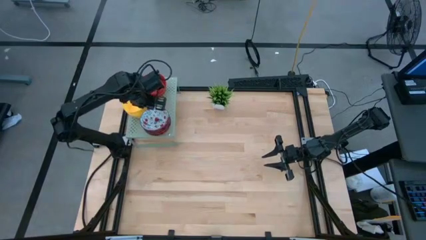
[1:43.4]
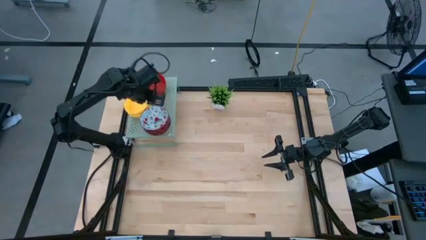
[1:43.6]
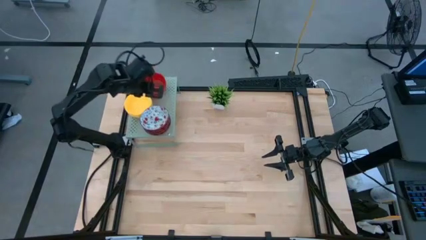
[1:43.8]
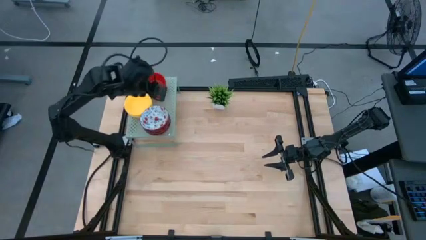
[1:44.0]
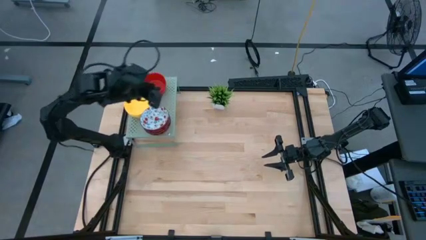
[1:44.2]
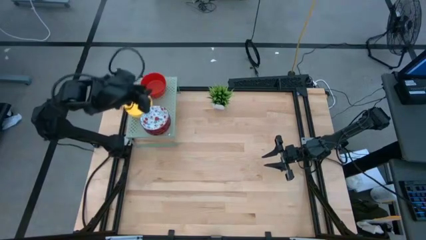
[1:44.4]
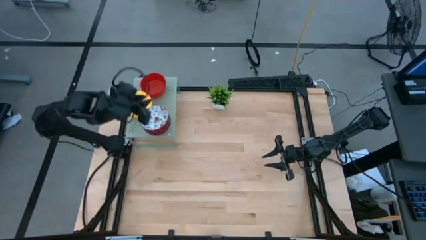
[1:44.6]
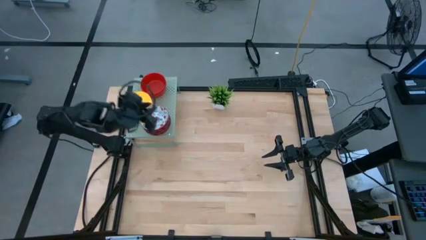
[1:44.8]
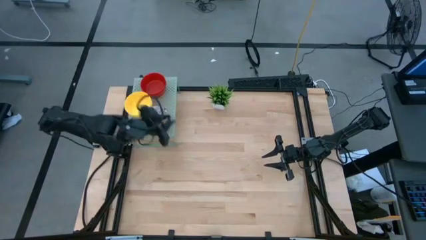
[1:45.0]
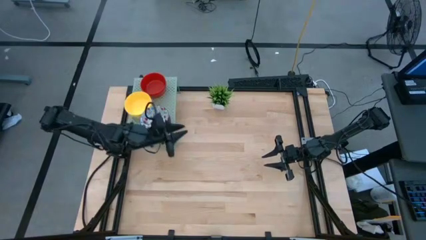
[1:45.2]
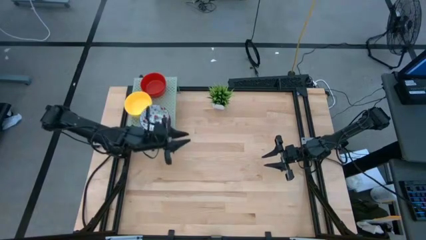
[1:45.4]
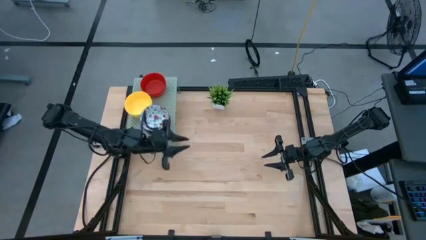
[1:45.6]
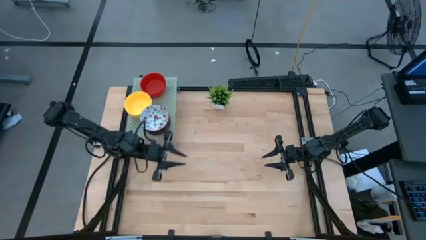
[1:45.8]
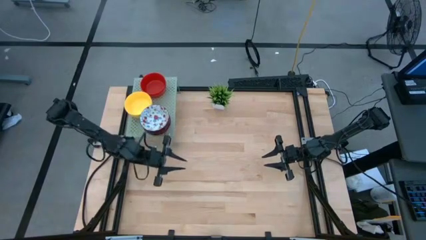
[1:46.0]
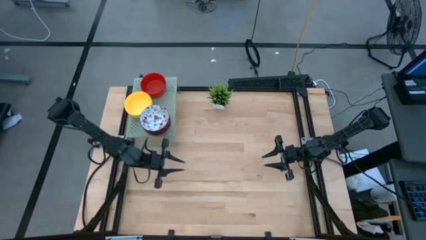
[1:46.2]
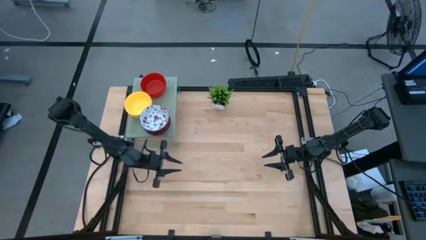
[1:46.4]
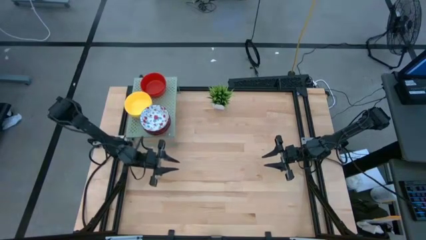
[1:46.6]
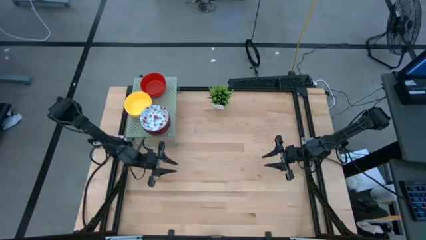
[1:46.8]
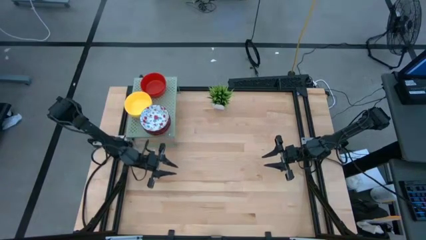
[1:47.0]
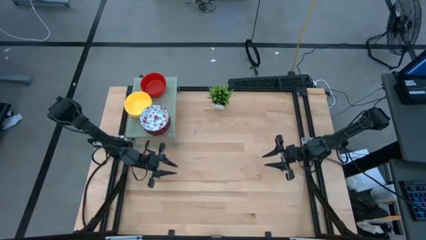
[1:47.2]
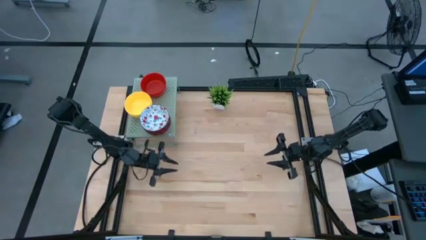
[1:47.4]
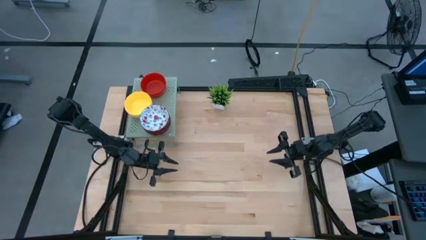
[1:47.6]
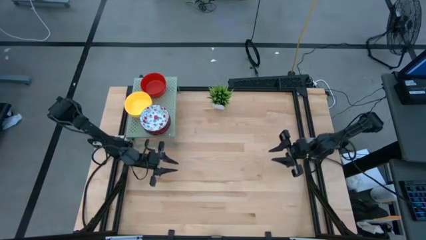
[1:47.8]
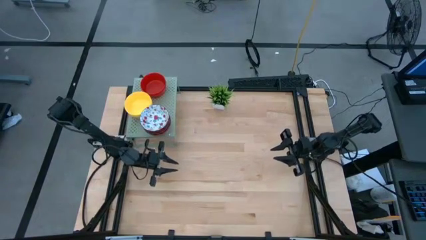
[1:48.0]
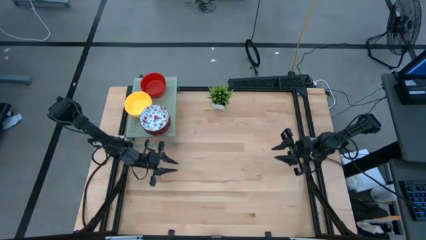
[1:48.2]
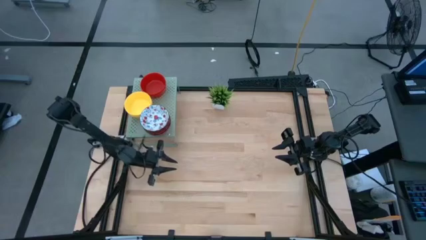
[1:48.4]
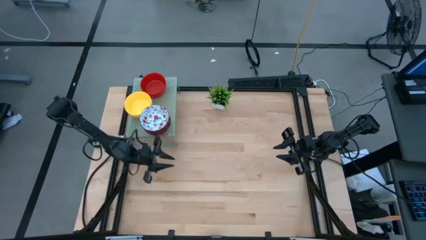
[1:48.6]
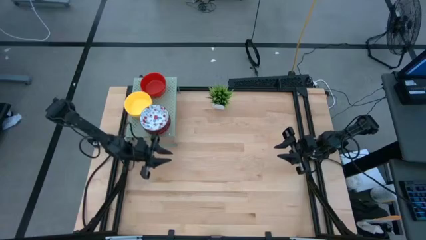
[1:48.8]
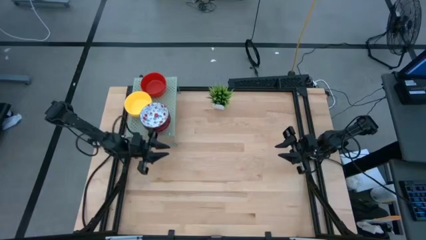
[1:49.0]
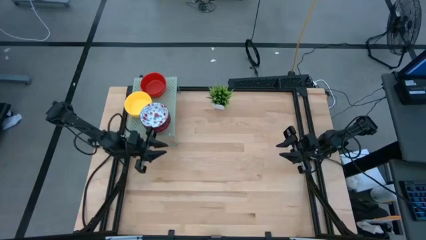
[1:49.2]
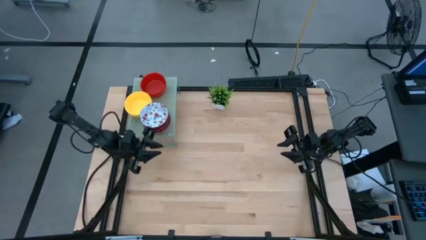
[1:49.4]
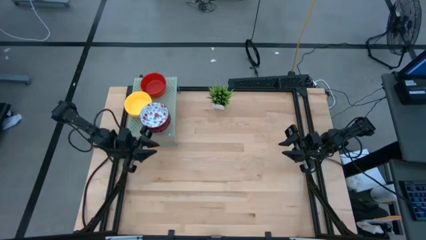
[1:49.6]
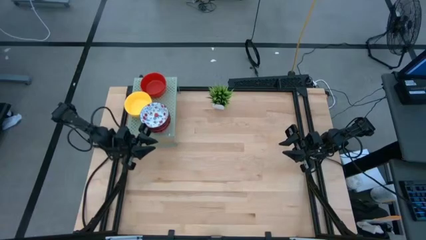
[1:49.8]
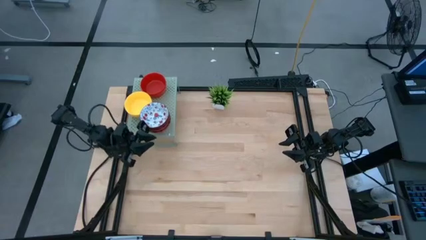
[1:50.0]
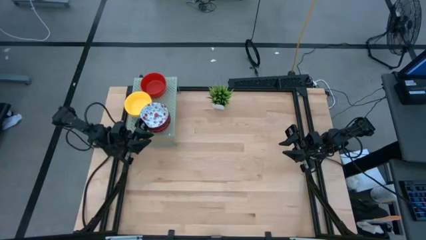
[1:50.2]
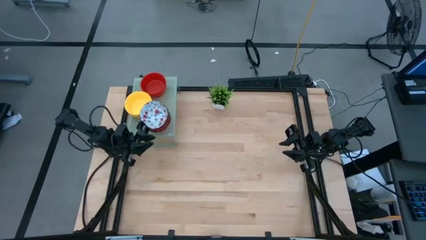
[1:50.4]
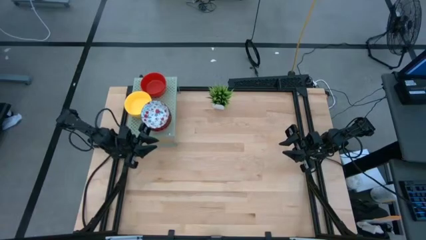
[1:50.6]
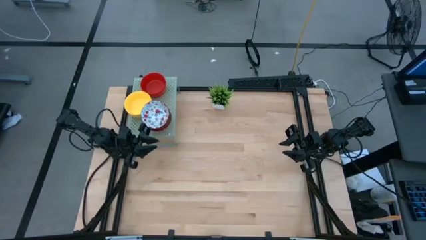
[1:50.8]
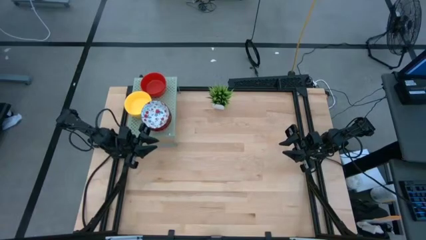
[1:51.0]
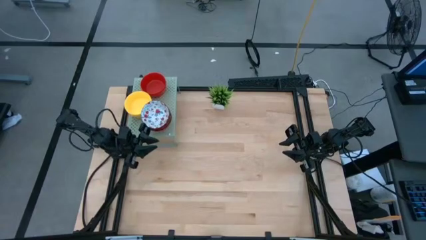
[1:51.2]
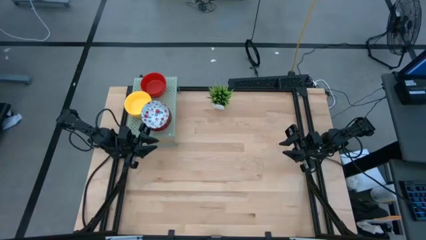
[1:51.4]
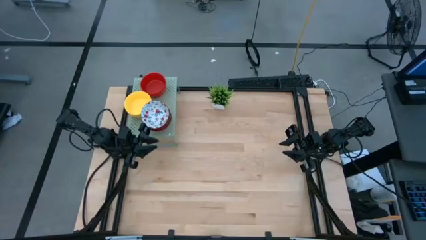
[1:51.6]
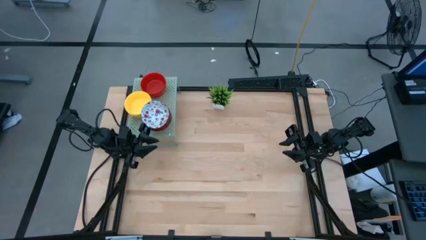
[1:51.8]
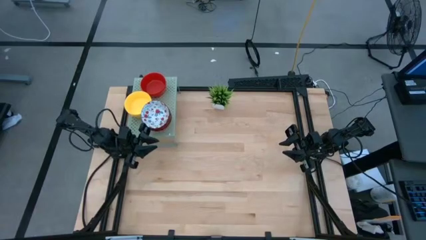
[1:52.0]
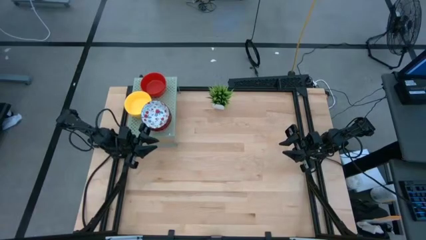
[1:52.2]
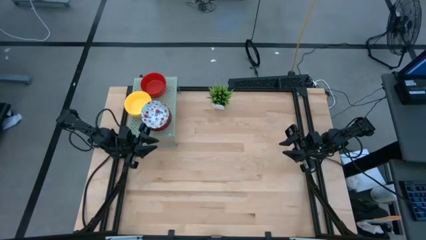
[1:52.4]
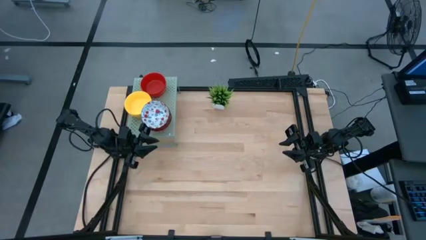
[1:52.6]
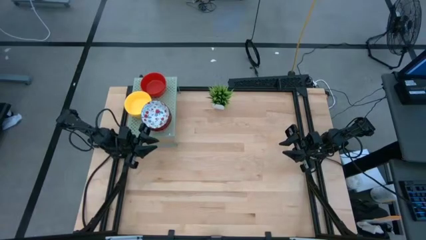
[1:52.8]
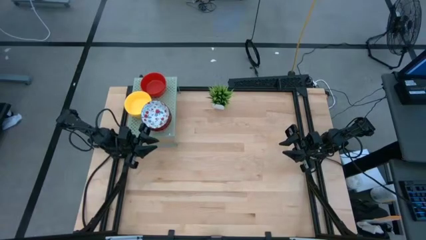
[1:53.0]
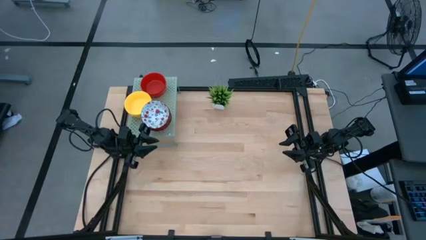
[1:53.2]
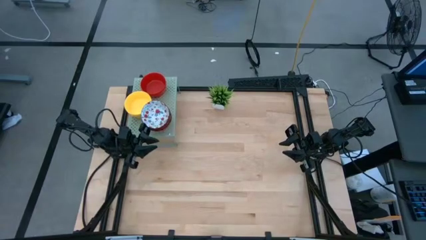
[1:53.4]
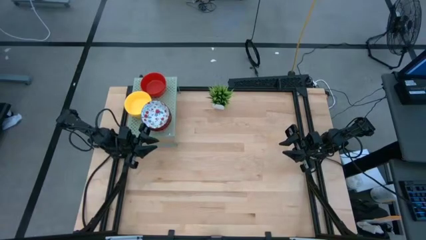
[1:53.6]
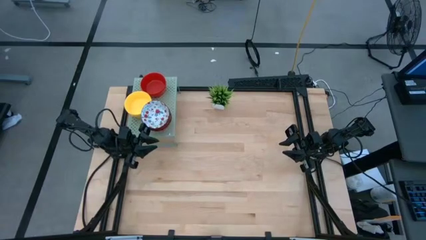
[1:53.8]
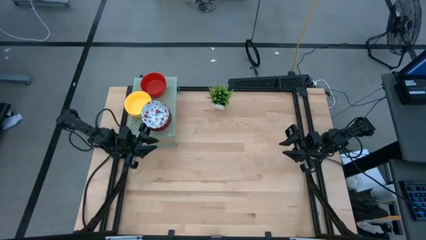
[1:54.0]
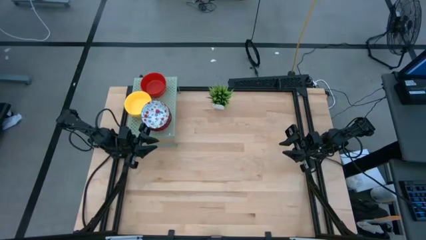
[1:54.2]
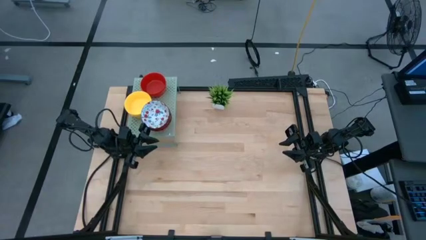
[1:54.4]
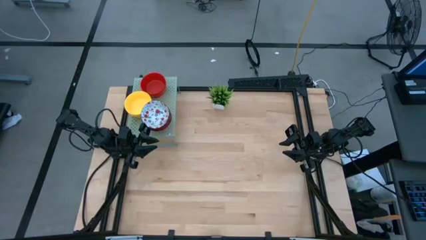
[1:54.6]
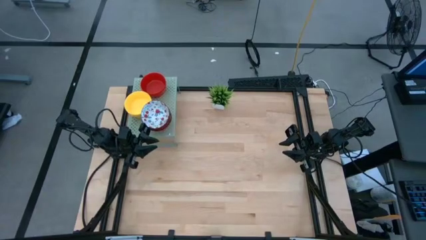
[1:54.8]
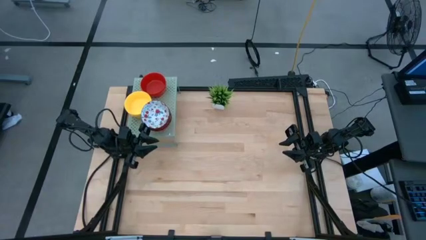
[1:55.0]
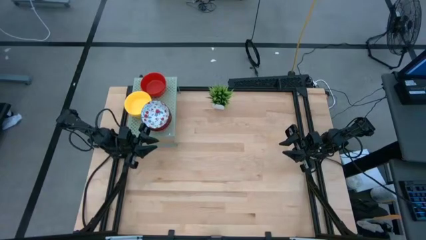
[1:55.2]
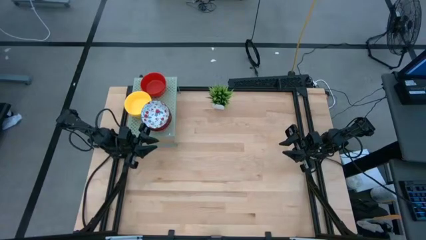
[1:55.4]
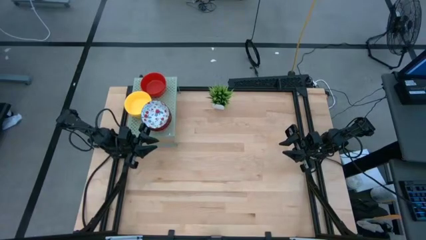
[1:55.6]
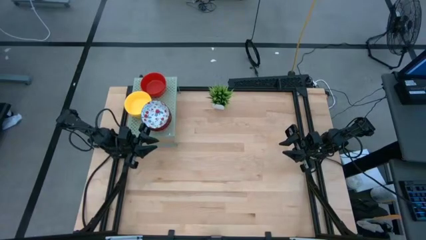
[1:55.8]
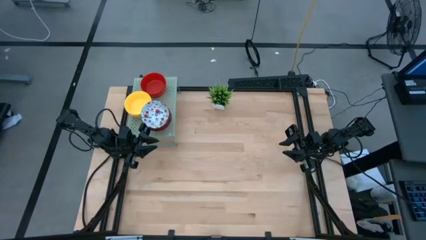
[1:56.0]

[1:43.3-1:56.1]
Task: Pick & Place Mini bowls
Return to Home Position

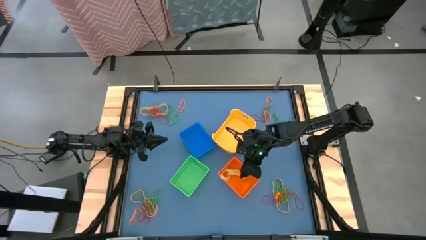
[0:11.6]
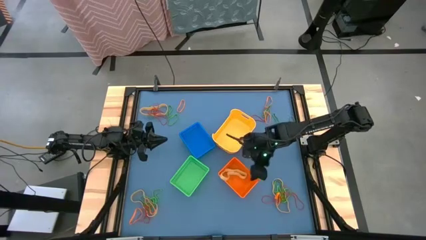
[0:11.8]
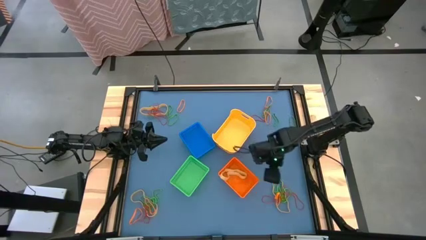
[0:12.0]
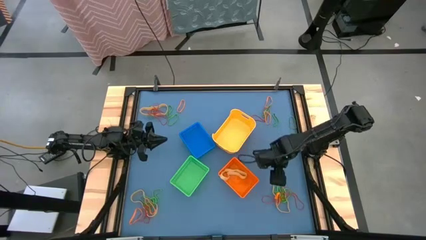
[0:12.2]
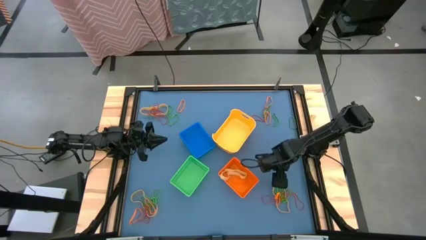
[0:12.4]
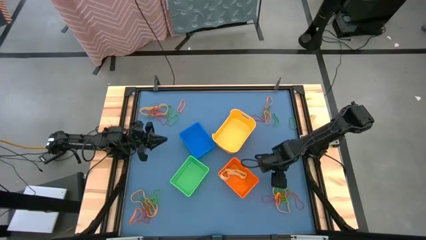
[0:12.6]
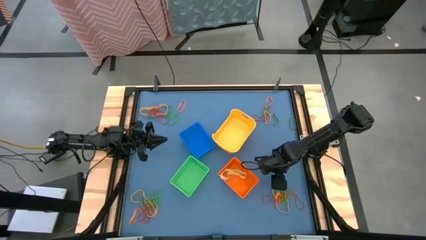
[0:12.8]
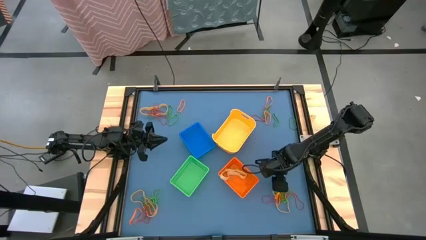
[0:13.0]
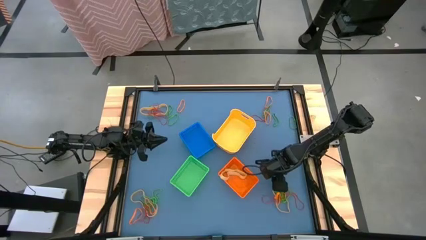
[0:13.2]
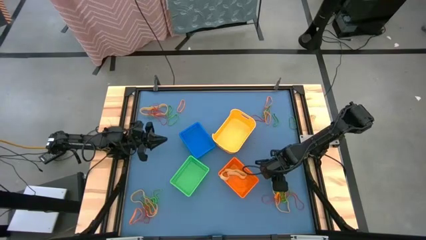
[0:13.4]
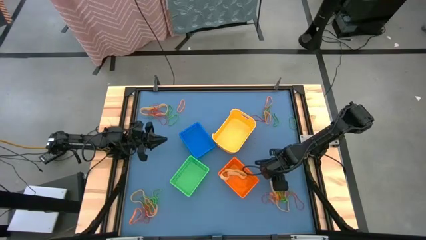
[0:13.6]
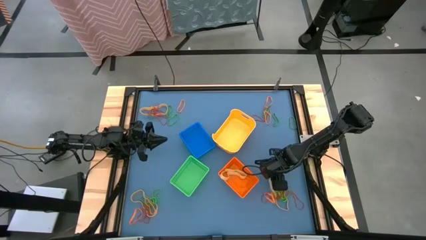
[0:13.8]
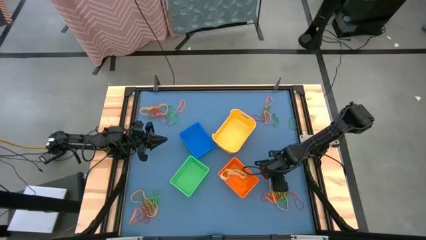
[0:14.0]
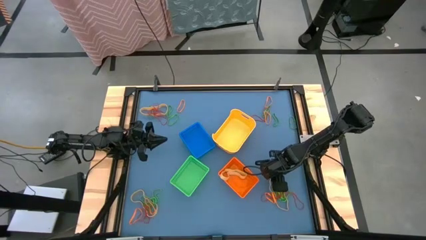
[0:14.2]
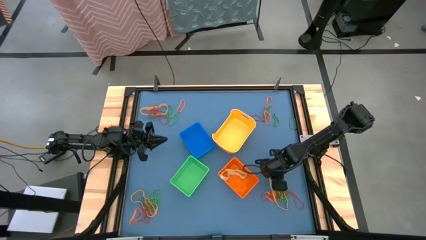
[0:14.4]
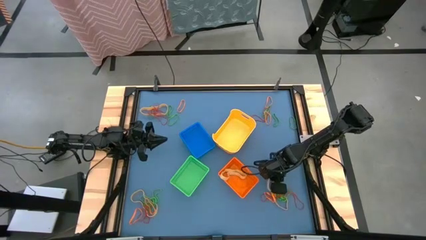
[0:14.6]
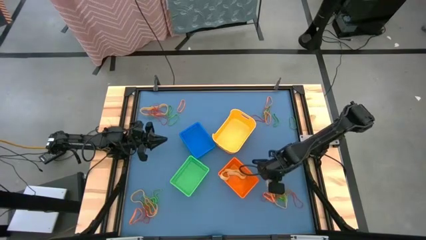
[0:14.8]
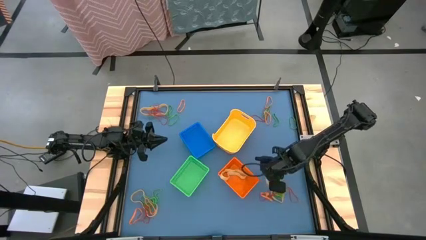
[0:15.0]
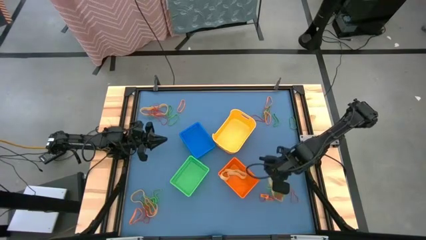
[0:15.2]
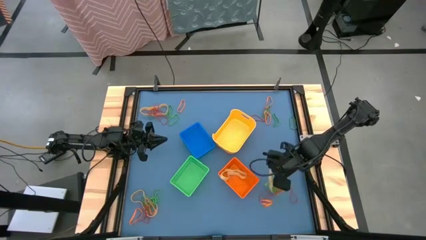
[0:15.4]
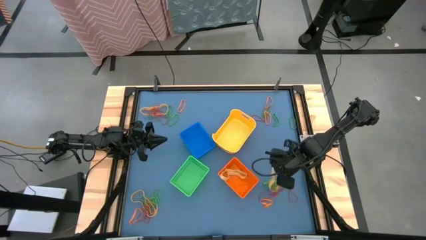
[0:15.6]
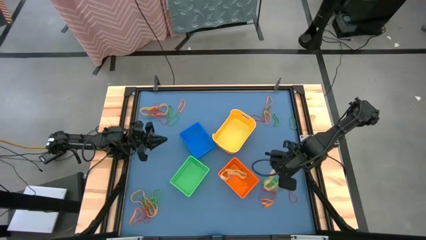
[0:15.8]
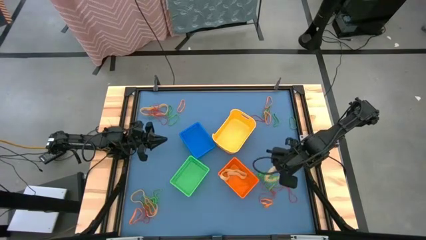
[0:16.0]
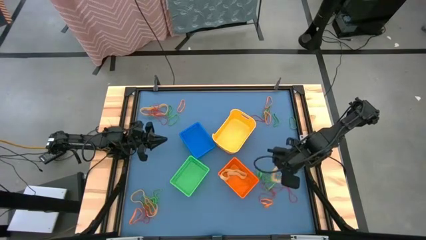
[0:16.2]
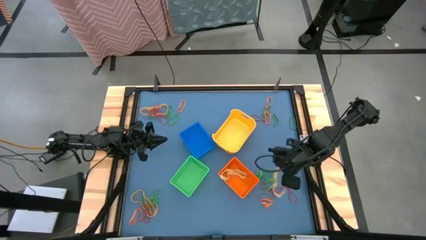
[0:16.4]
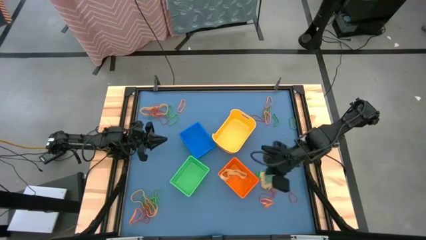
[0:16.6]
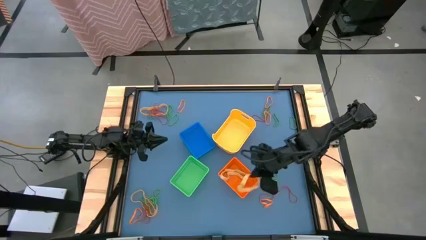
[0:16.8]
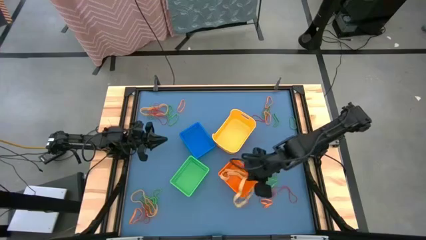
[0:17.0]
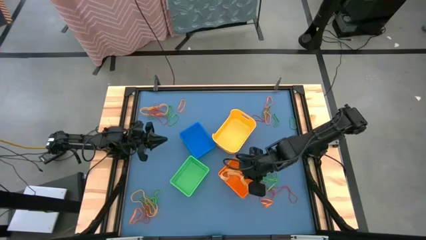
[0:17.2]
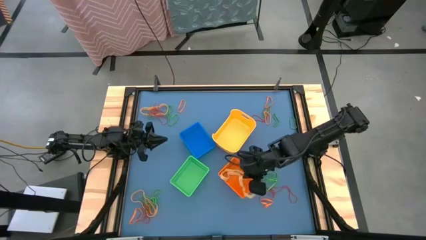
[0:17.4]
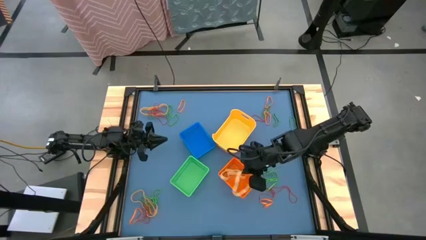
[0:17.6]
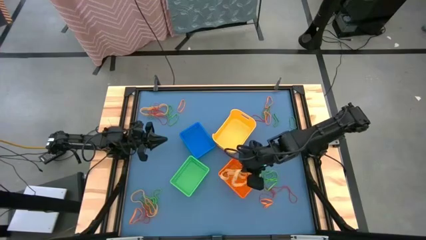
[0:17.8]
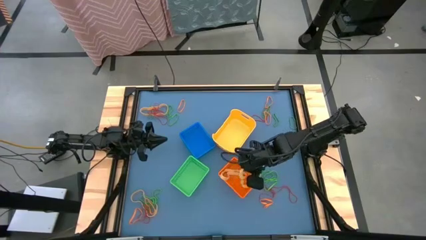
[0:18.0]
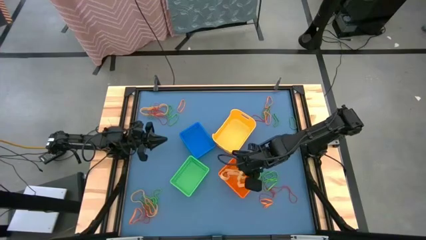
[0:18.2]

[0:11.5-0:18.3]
Task: Sort rubber bands into baskets
Put the yellow rubber band into the orange bin
